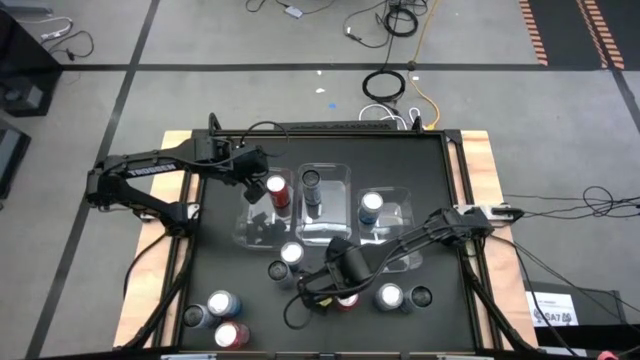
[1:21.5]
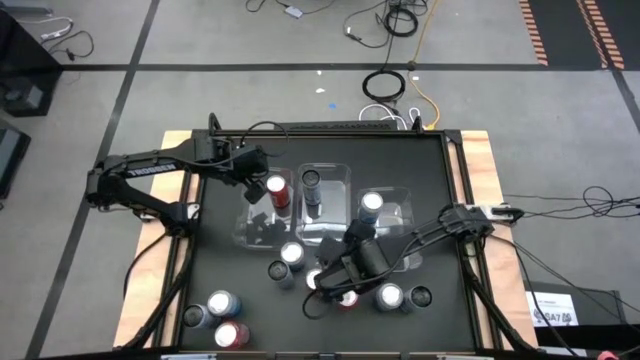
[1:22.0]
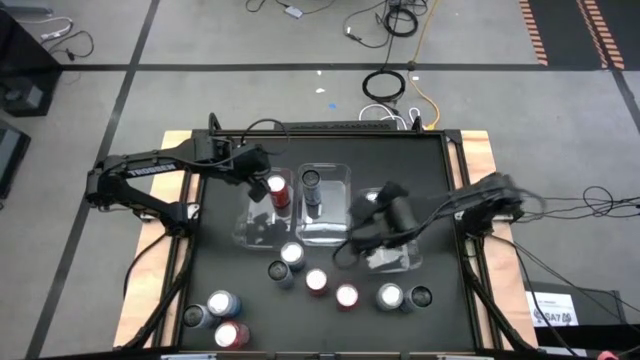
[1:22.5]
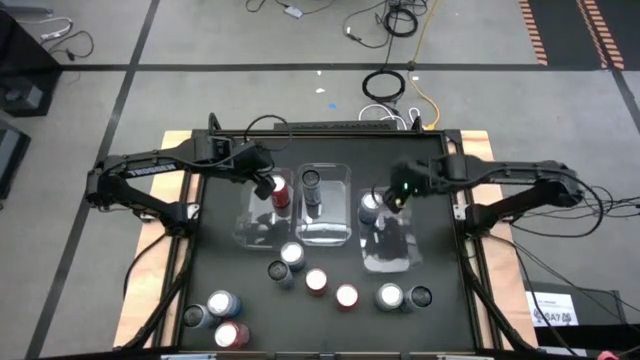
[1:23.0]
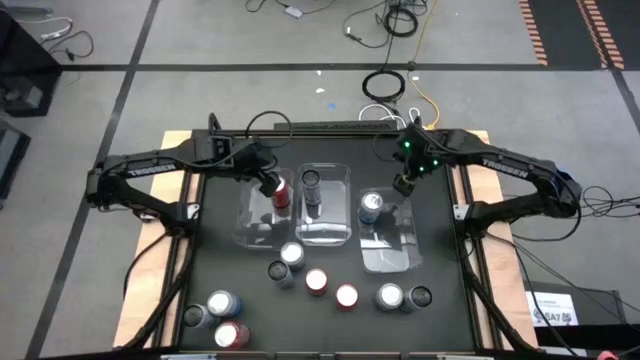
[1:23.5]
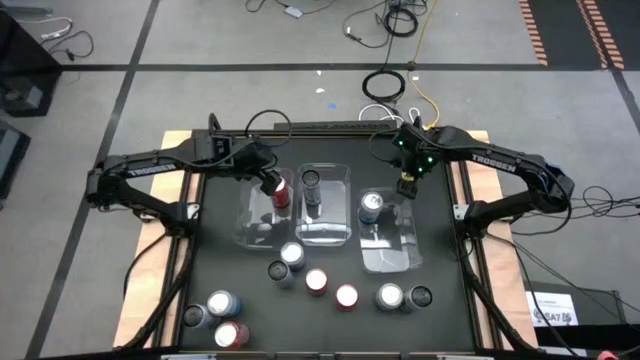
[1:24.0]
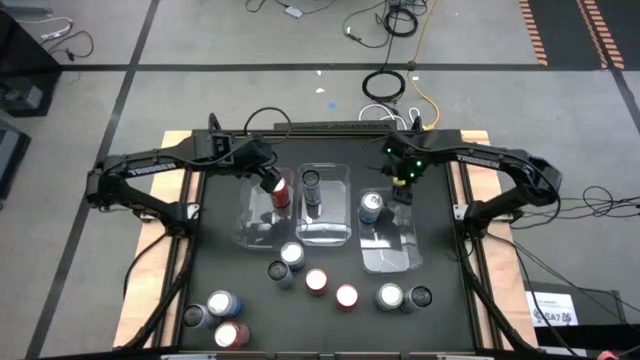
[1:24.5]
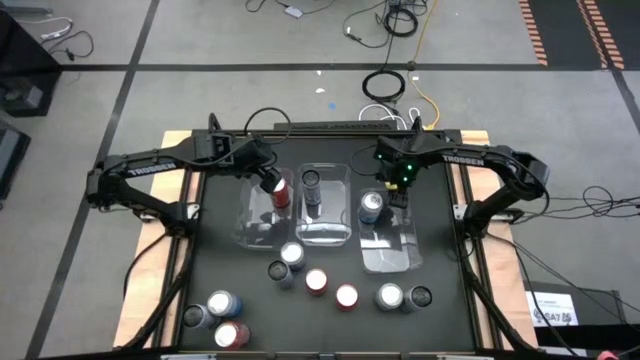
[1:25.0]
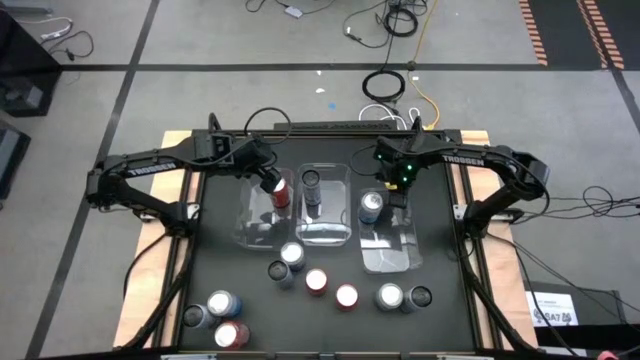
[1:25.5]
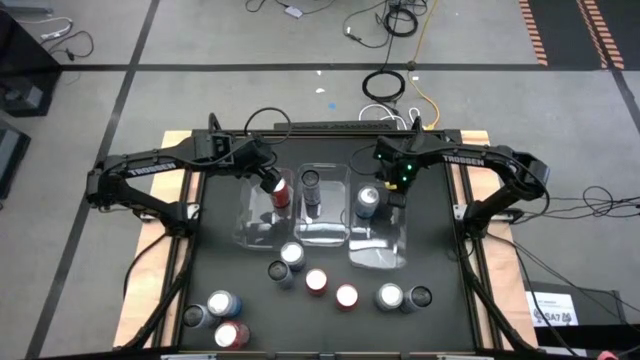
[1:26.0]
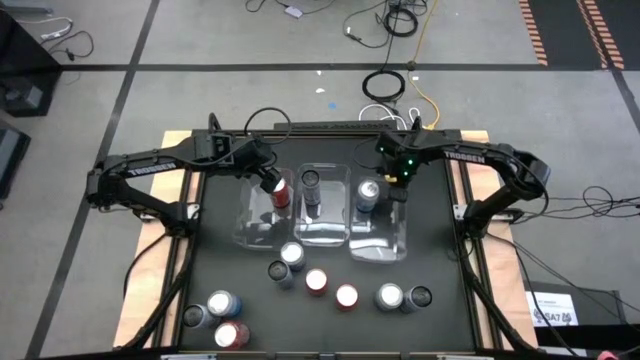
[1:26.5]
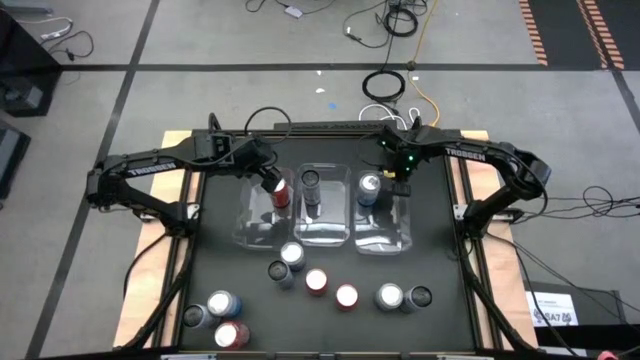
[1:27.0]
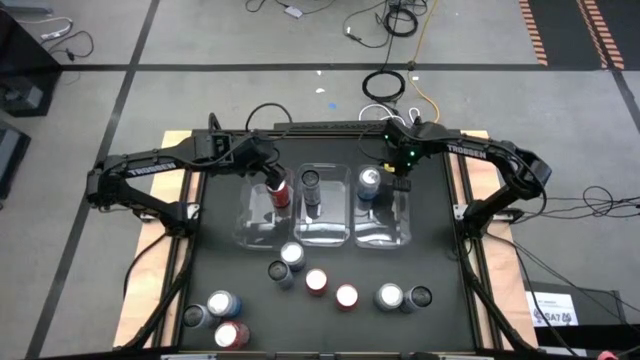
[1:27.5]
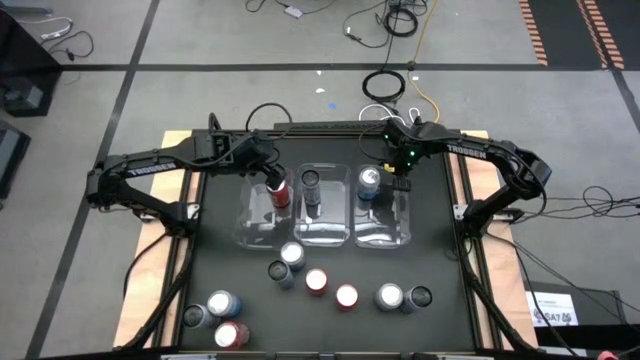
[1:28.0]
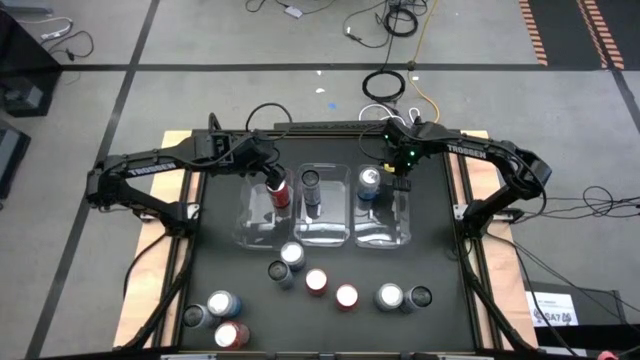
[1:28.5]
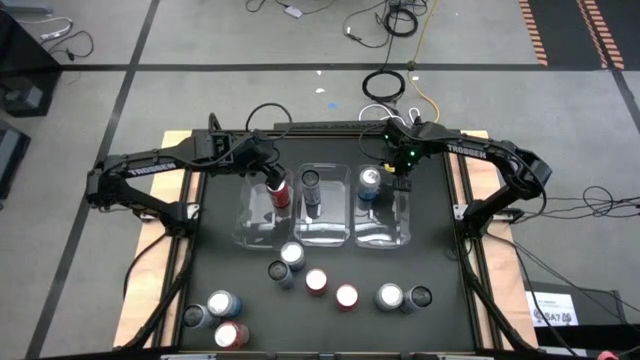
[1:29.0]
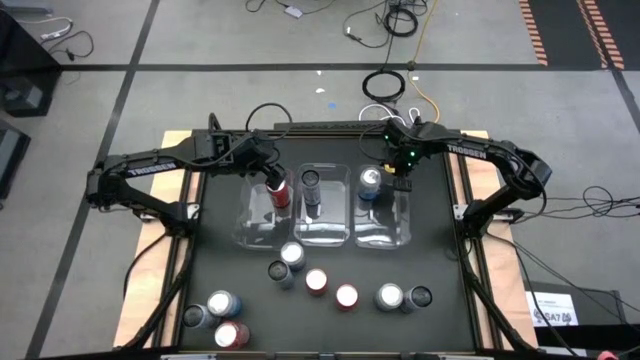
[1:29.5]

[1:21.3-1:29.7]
Task: Sort soda cans
Adjust the middle right transparent bin on the table

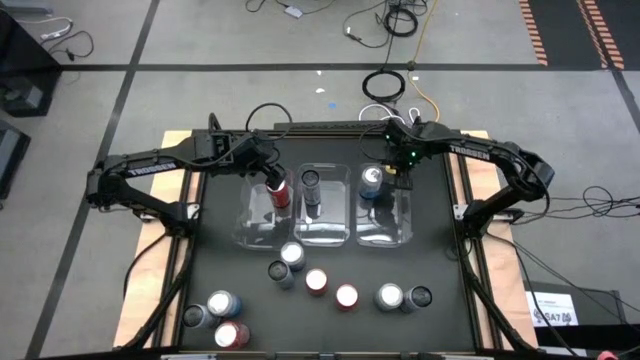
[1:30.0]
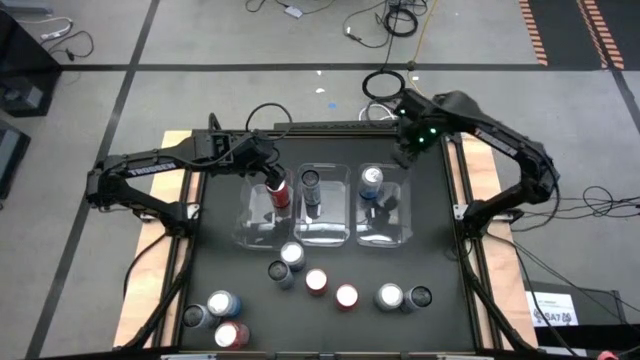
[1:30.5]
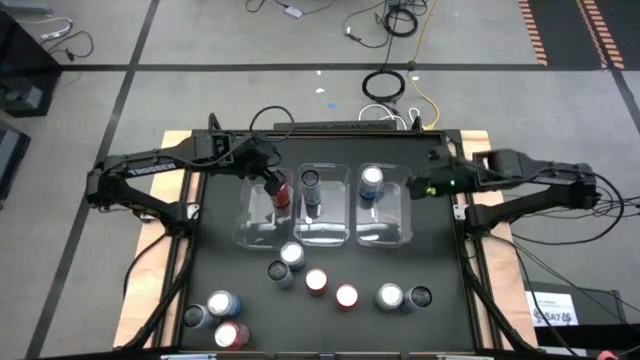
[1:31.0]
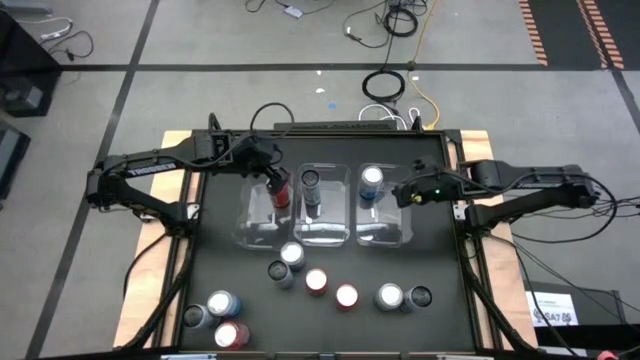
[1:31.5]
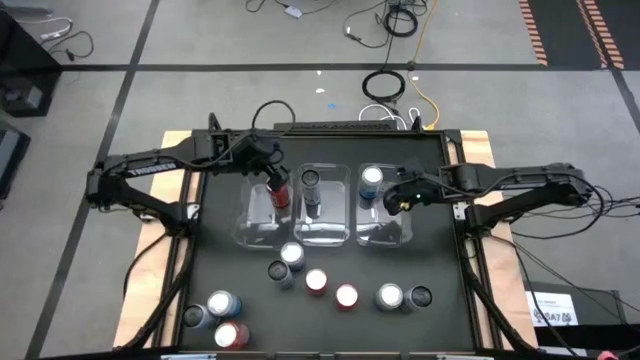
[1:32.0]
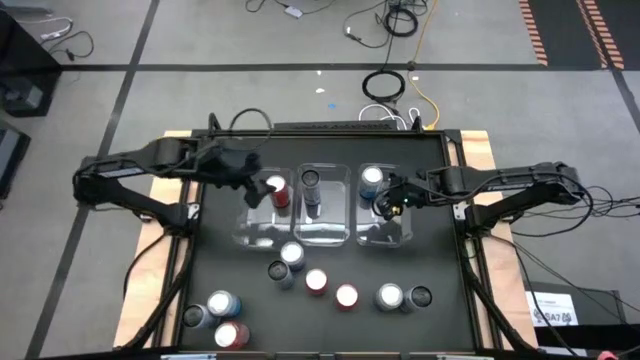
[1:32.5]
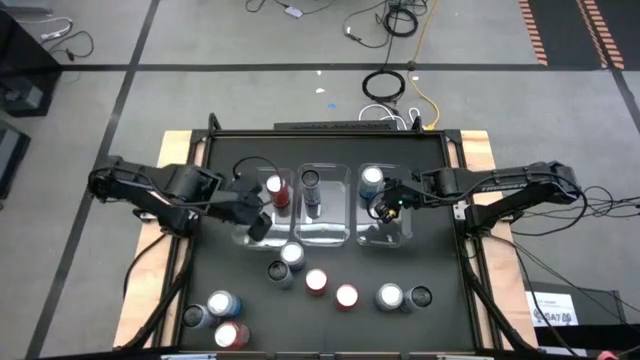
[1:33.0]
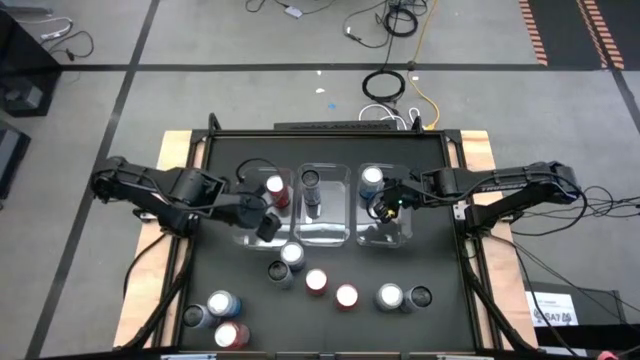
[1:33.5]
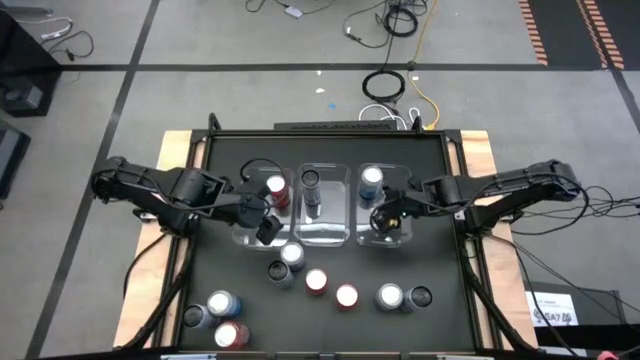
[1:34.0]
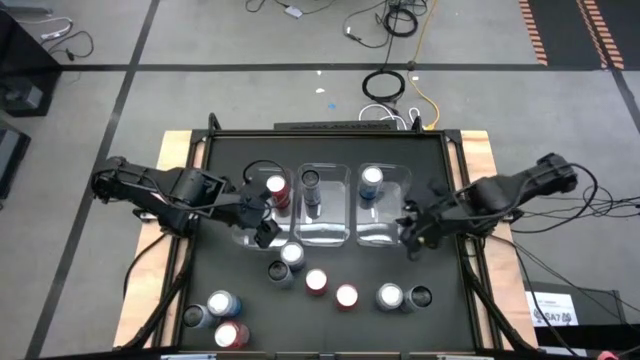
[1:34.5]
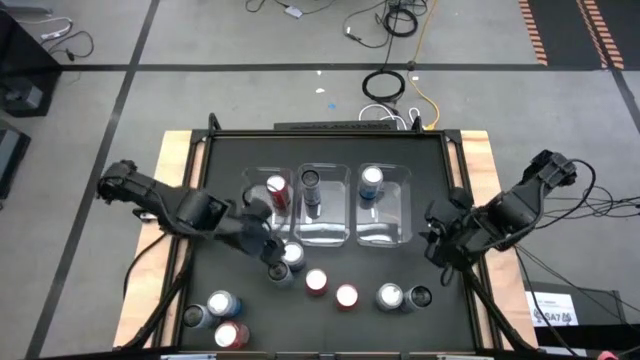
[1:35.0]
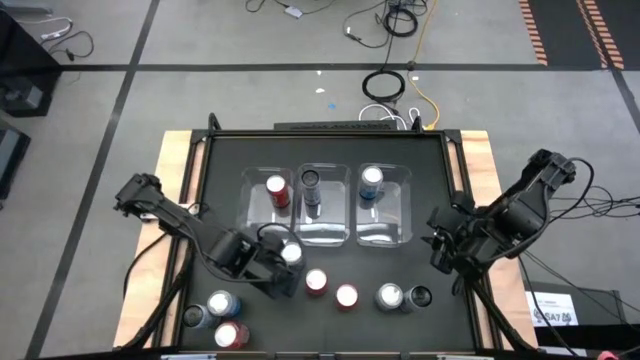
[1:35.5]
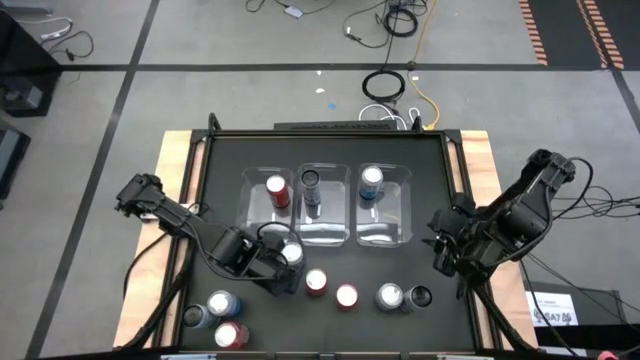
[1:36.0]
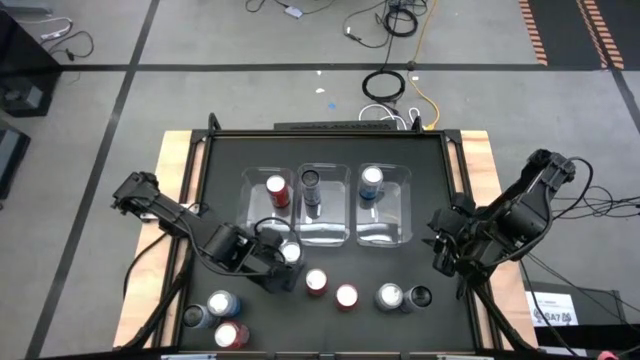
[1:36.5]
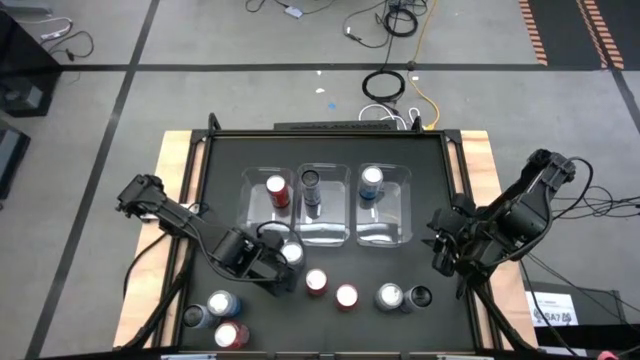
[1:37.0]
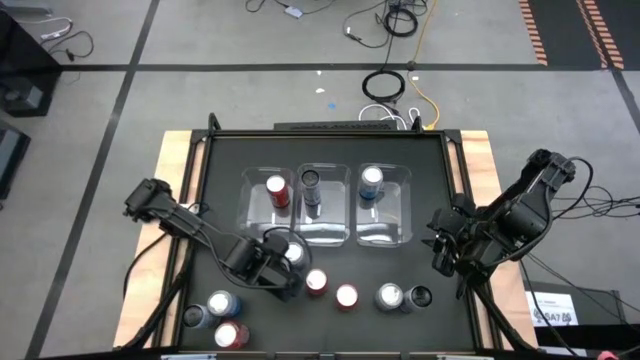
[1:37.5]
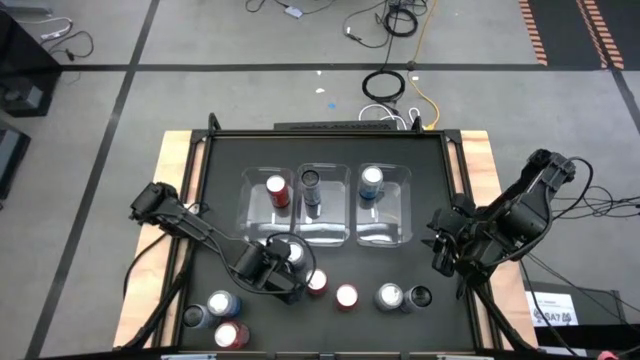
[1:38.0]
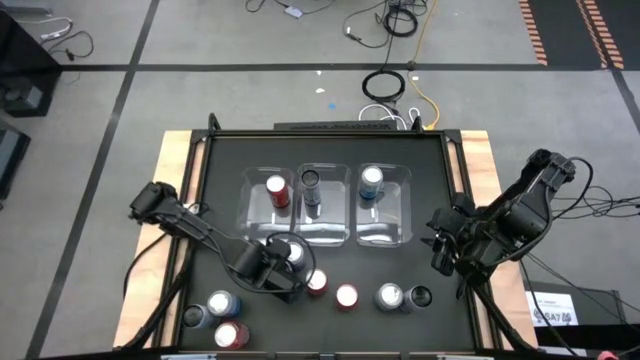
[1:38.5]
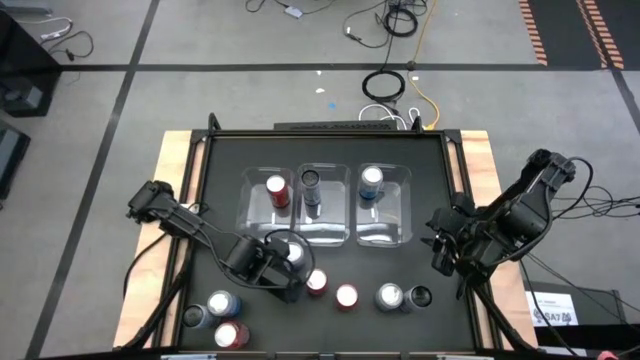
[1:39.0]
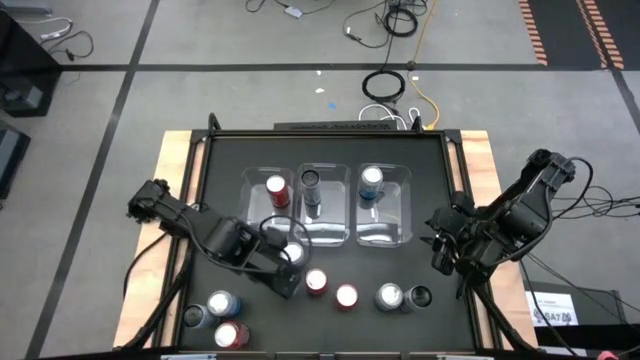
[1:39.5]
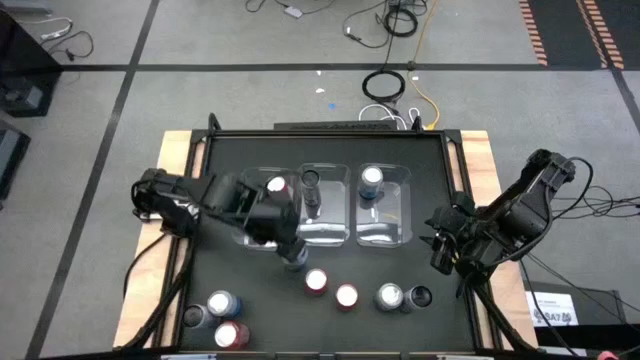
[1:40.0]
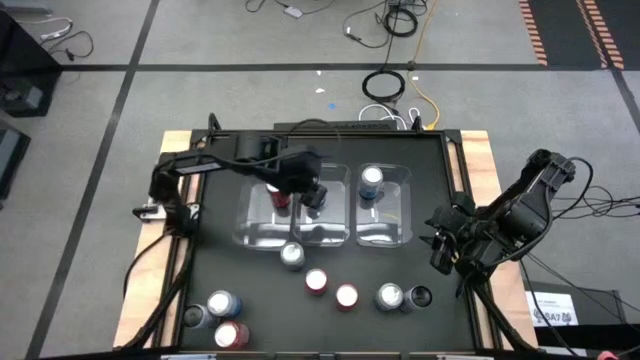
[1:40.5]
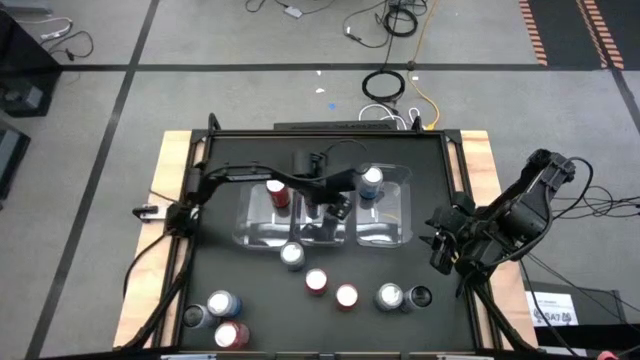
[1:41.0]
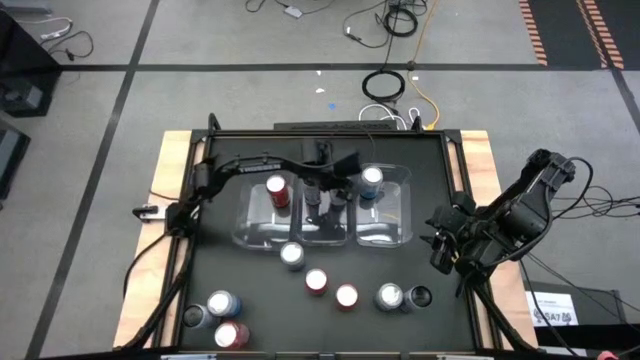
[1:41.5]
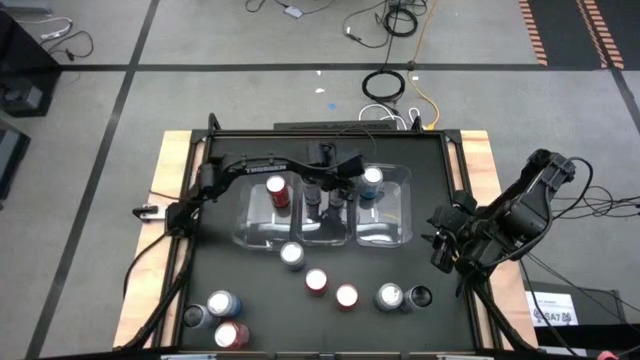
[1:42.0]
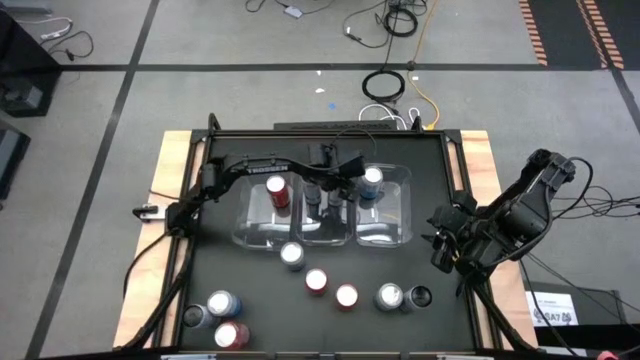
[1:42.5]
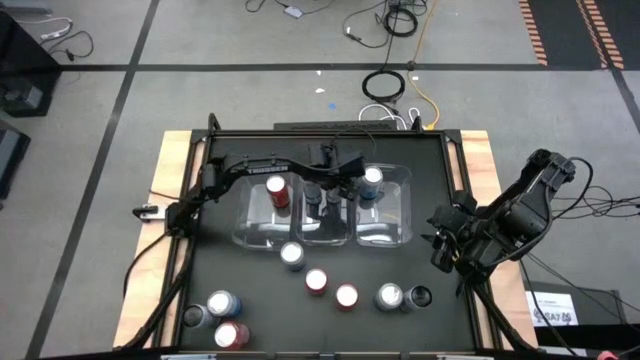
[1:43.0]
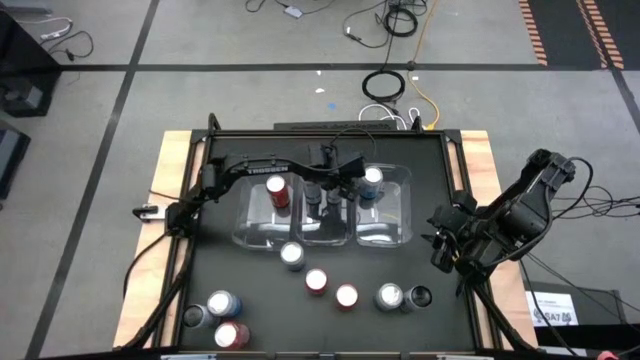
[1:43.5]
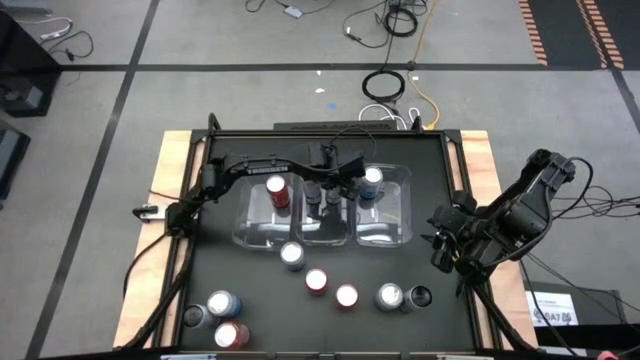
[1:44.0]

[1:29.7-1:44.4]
Put the white-blue soda can into the center transparent bin

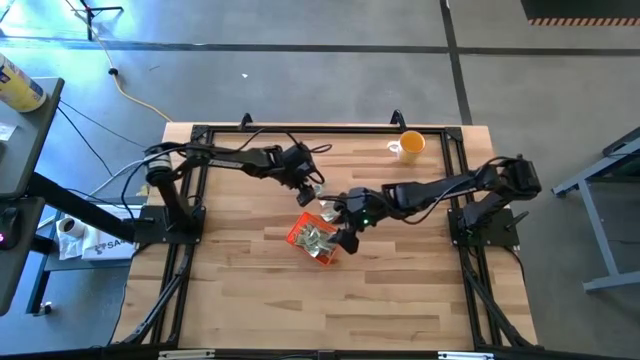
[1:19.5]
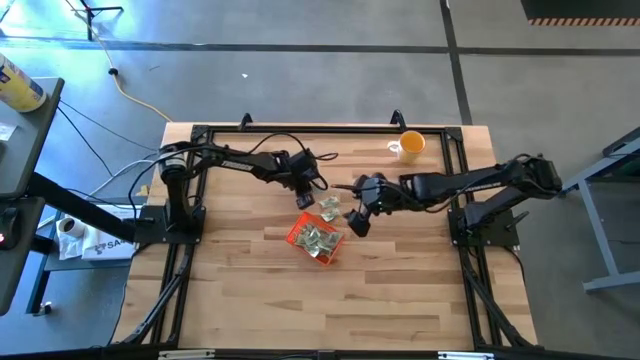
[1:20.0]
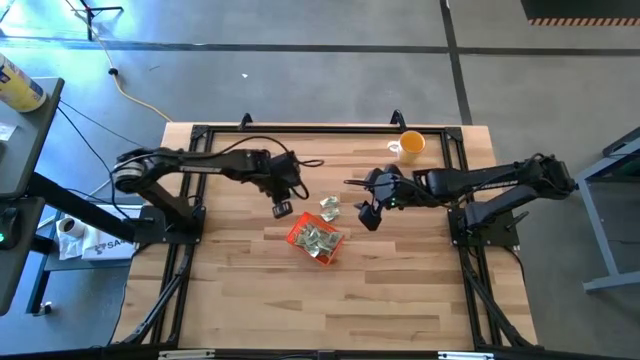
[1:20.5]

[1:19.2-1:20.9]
Task: Pick and place Stevia / Truvia into bins
Put the stevia packet into the orange bin
